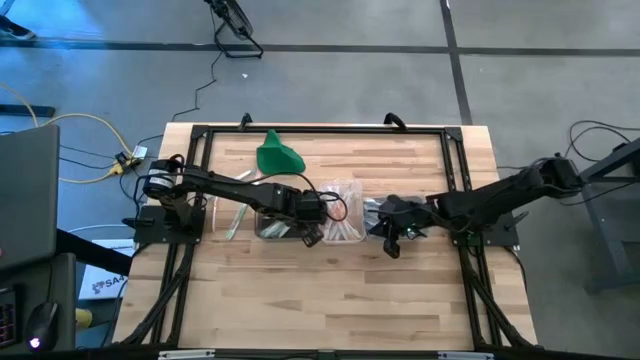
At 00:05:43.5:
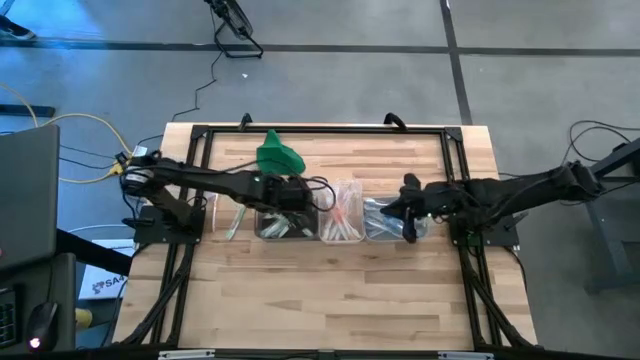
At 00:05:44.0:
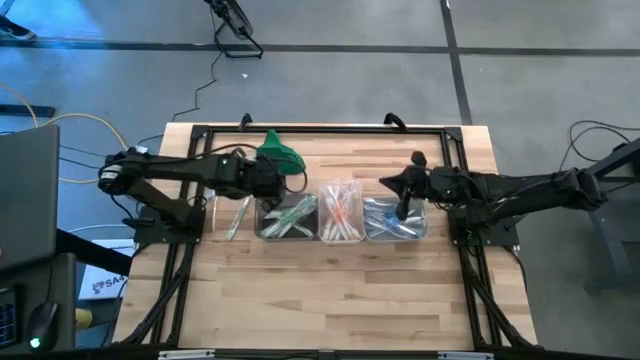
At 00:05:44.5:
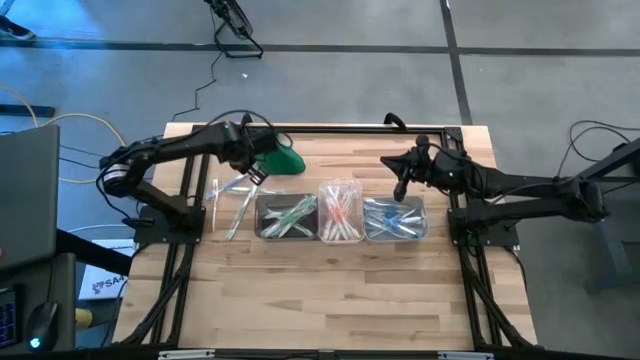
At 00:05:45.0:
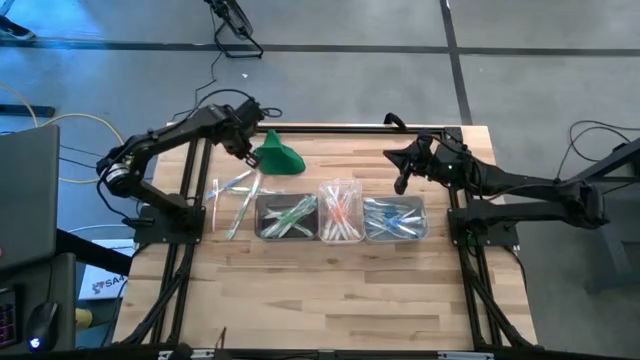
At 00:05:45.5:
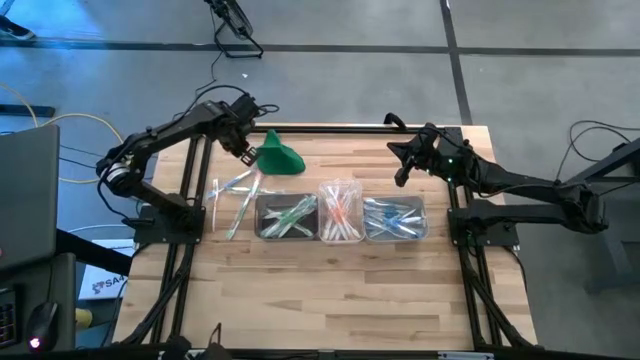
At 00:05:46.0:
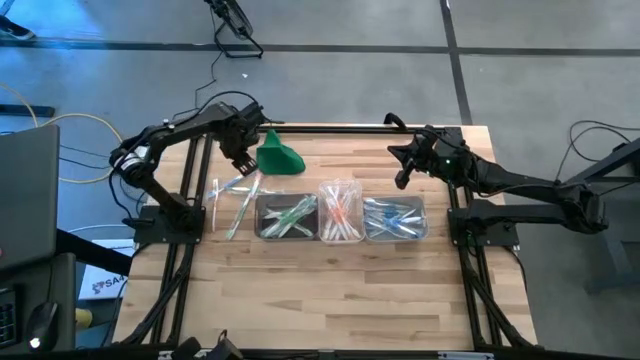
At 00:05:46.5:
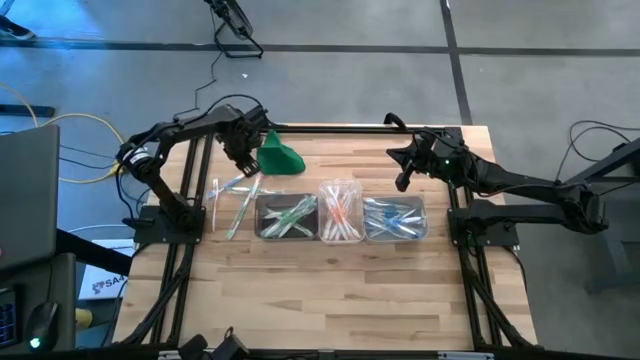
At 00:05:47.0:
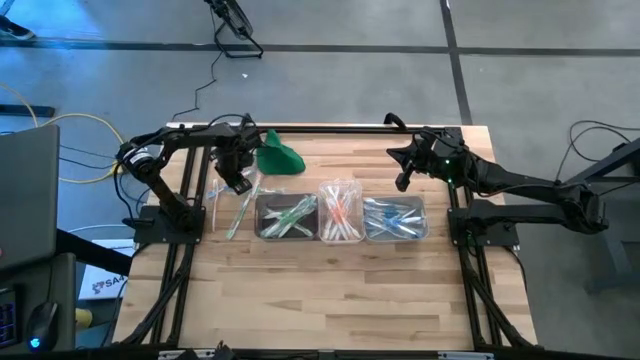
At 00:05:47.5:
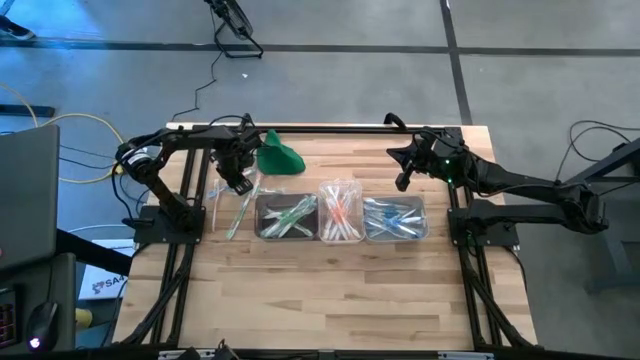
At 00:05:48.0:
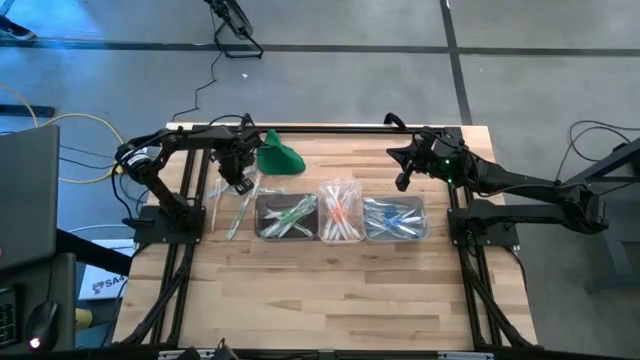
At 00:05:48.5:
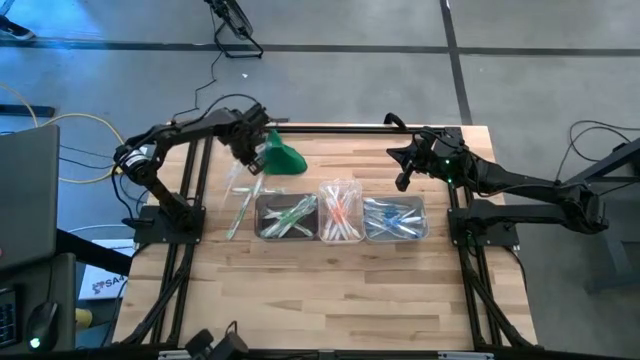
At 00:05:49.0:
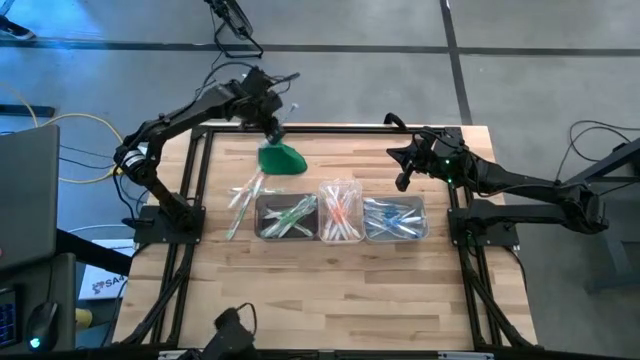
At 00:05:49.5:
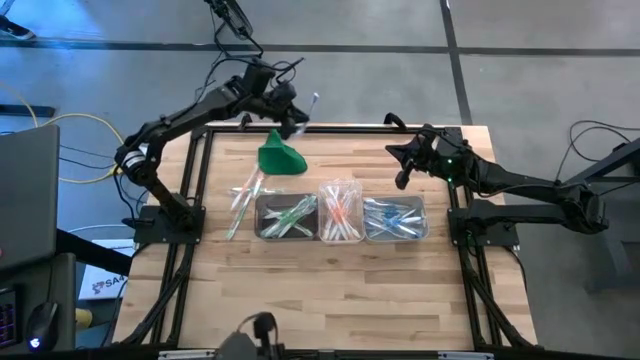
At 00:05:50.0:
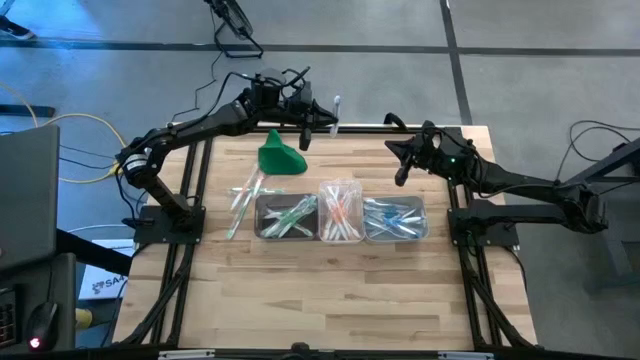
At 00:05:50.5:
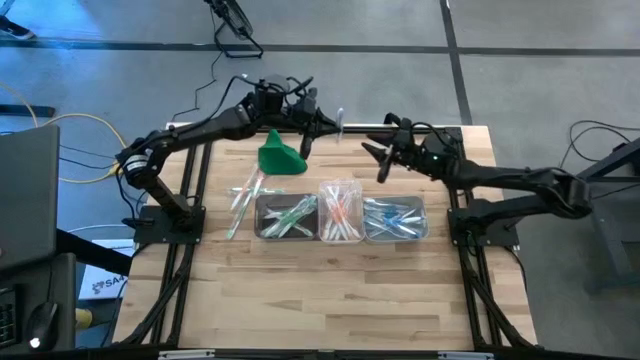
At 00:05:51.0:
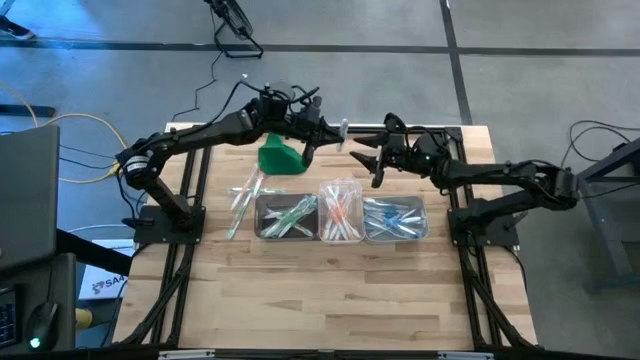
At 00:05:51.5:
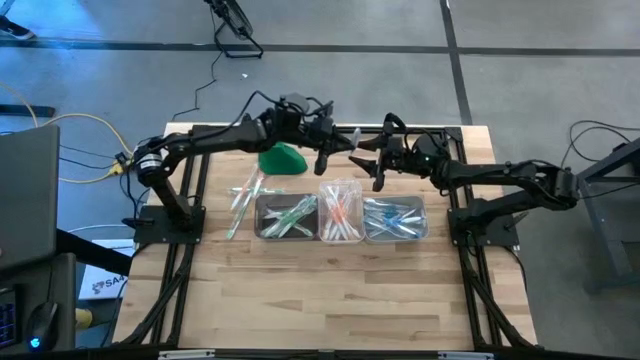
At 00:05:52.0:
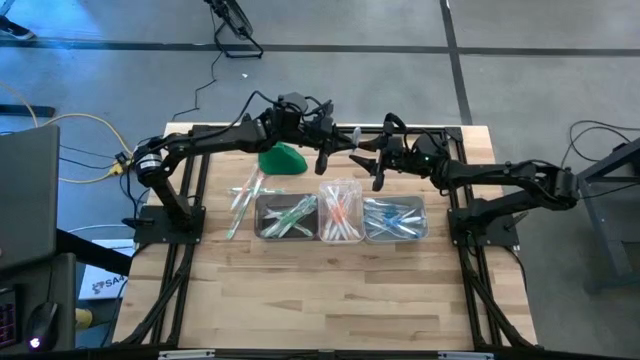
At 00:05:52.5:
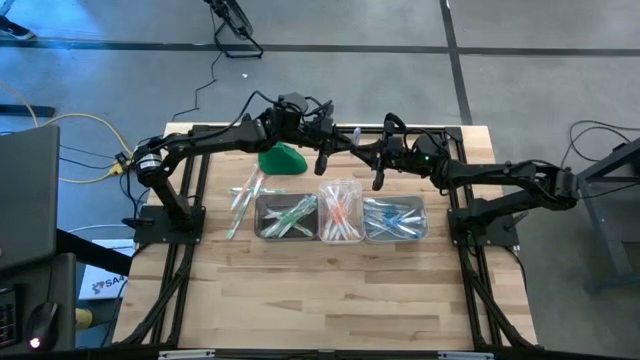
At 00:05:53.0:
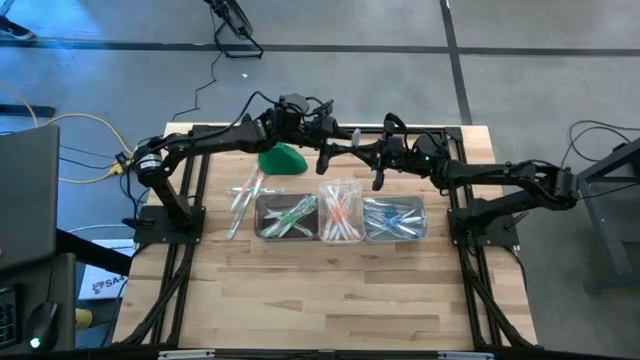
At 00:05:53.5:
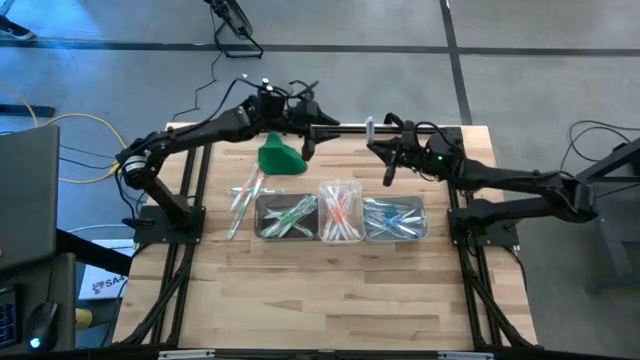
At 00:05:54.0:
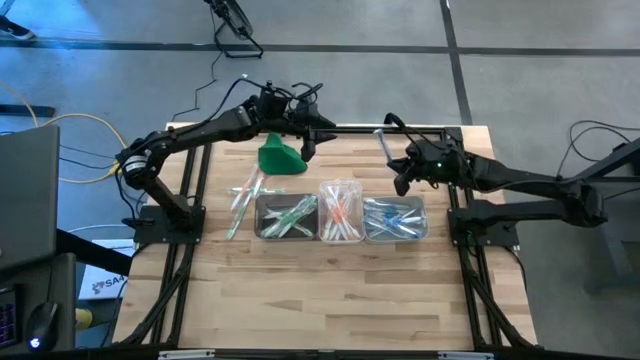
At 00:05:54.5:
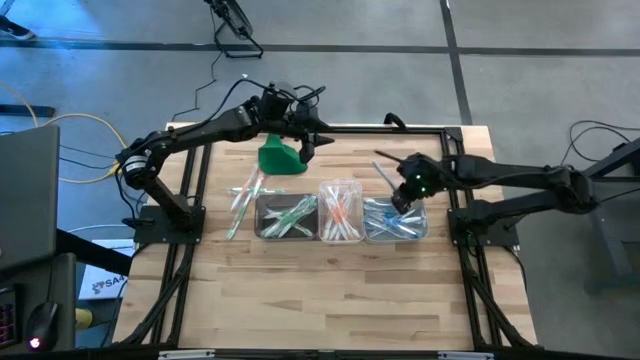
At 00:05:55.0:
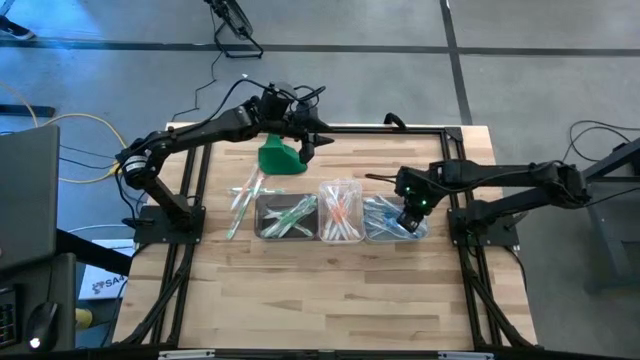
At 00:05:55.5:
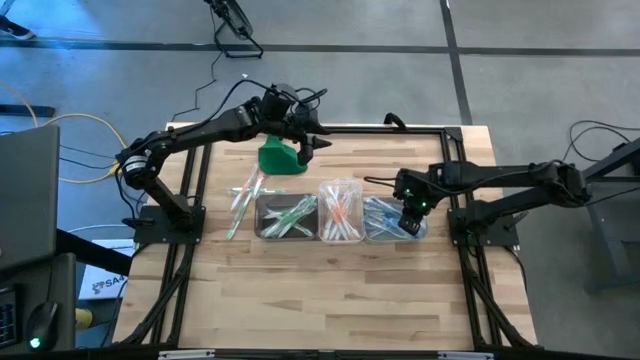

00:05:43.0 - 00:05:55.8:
Task: Pick & Place Toothbrushes
Put the blue toothbrush into the gray bin

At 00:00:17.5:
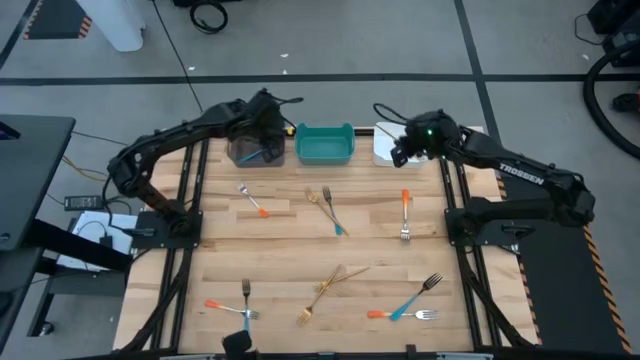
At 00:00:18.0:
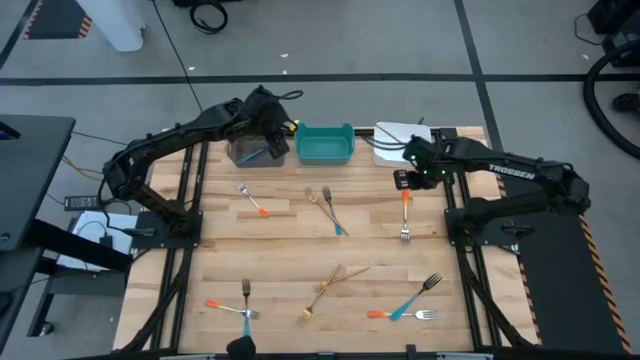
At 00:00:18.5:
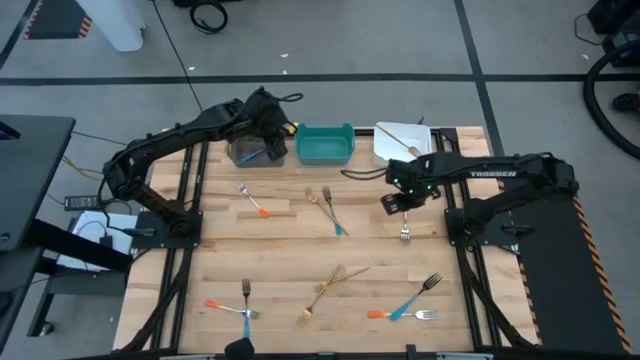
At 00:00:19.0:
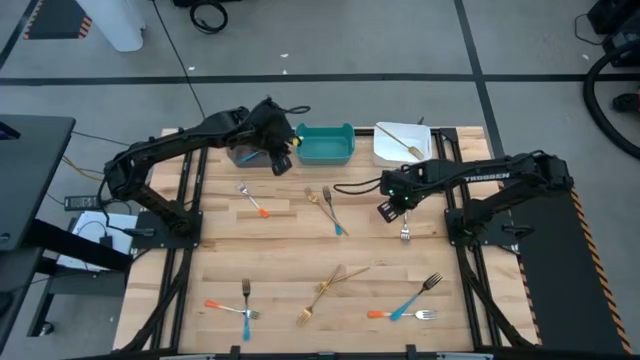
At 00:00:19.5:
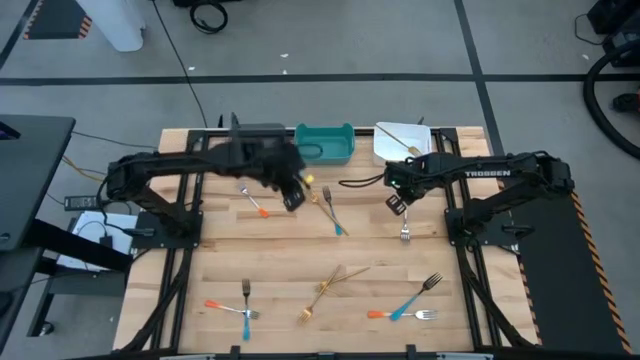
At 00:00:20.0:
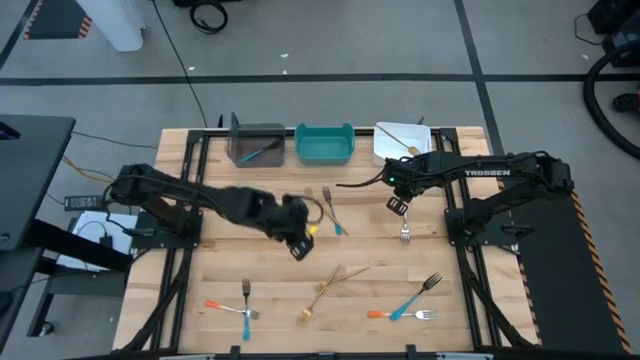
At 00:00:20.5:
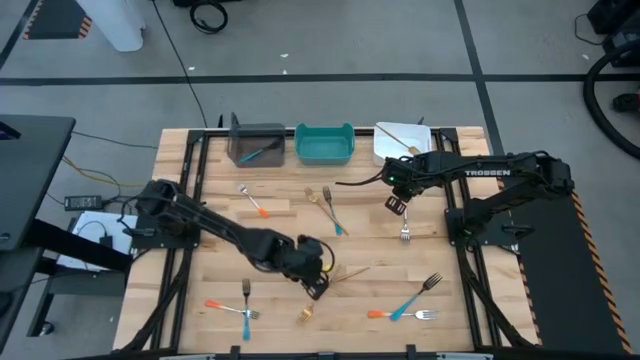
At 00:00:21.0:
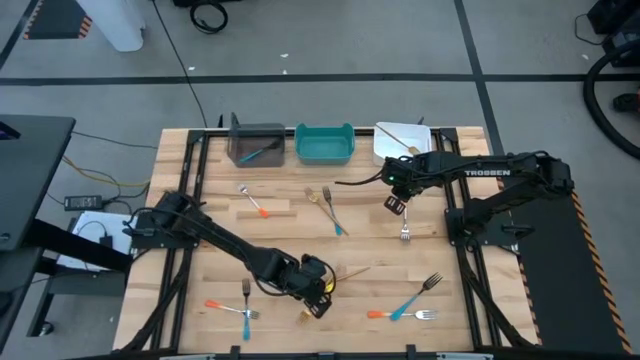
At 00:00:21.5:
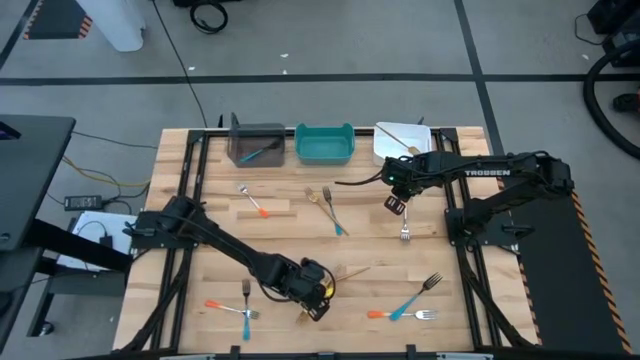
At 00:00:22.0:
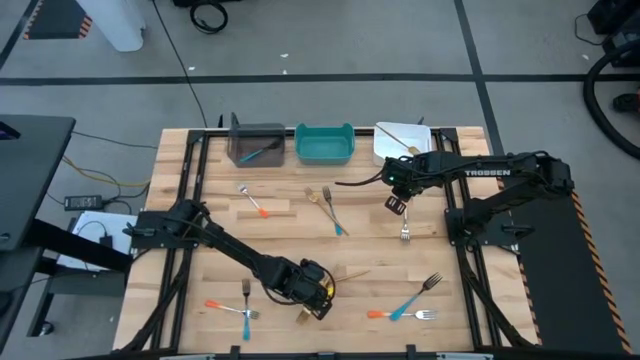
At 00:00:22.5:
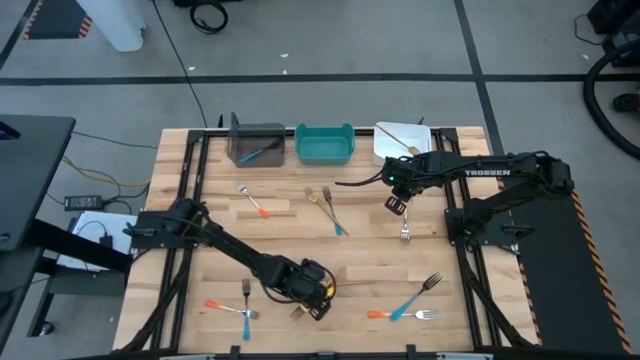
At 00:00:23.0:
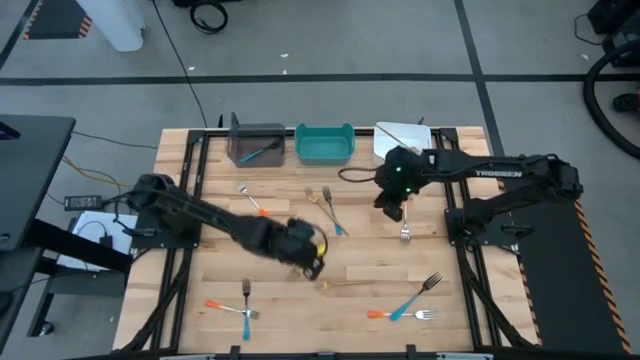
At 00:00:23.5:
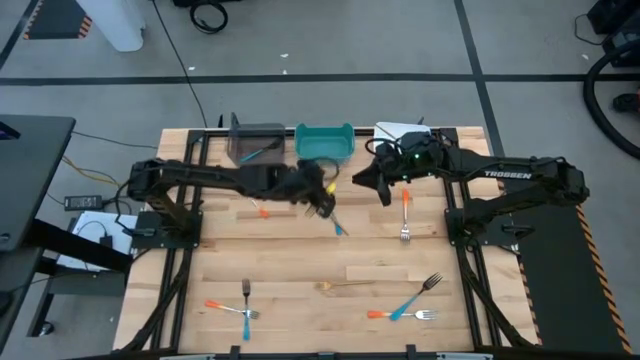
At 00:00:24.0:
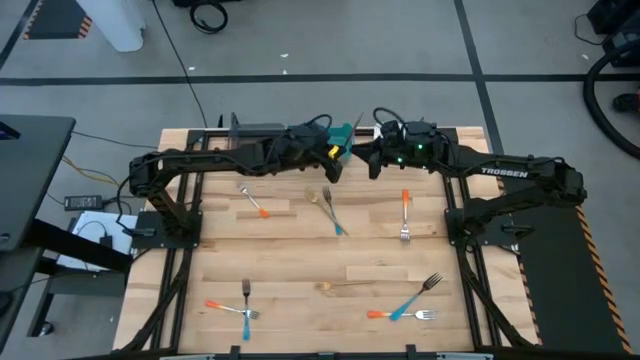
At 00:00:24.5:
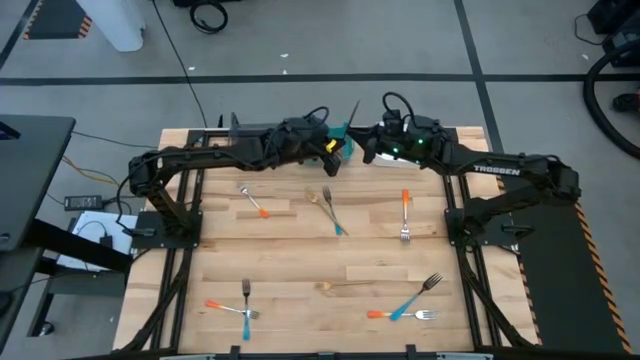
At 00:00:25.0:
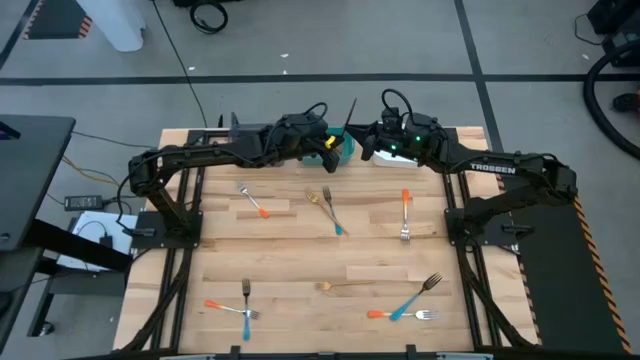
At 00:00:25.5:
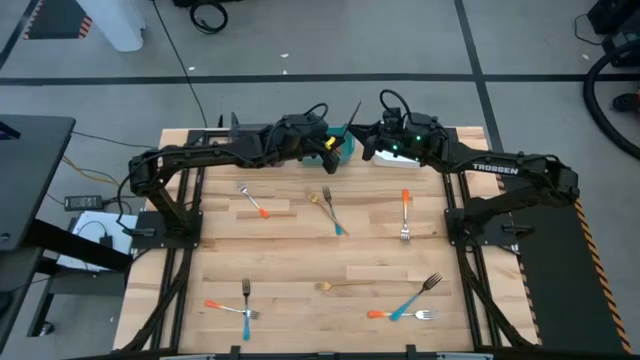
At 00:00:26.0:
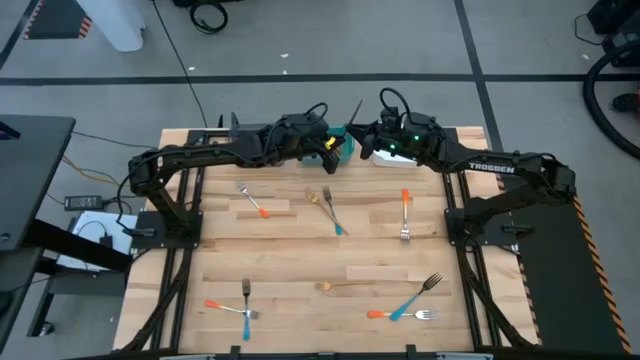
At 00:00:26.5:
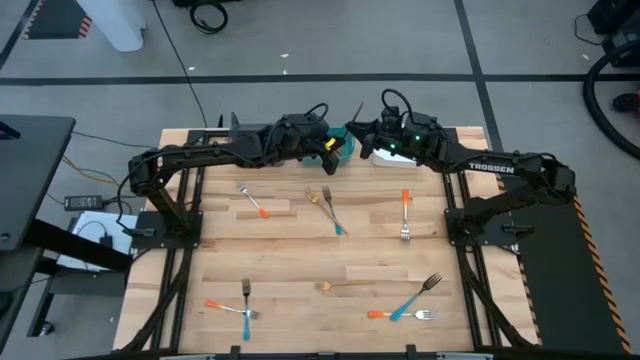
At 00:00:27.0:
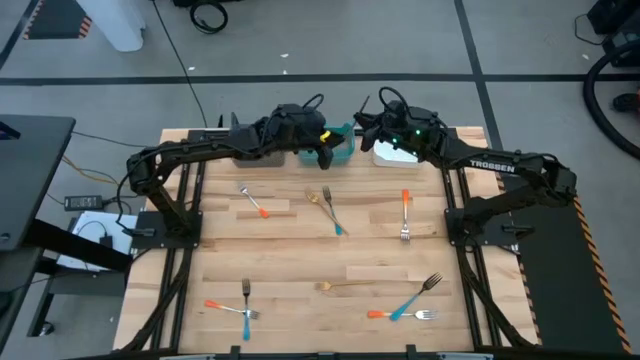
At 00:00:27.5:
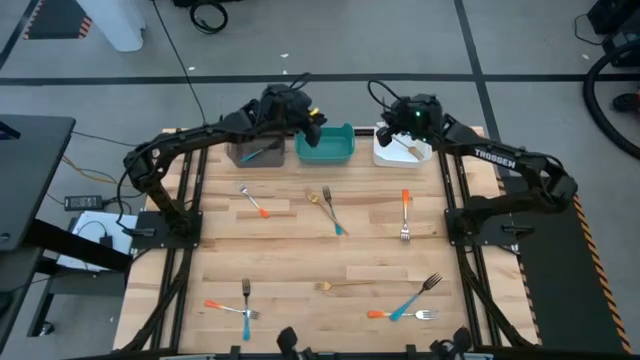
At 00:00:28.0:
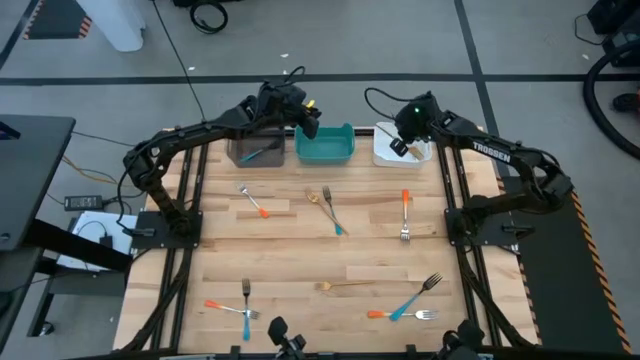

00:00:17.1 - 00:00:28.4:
Task: Sort silverware by color (type)
Put the bottom left gold fork into the white bin
